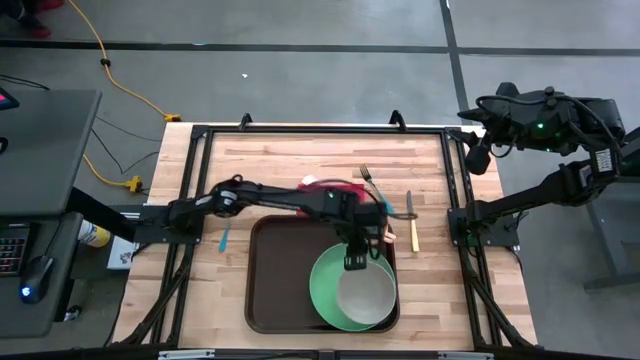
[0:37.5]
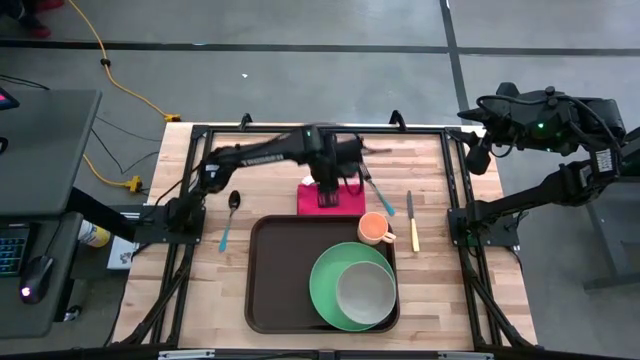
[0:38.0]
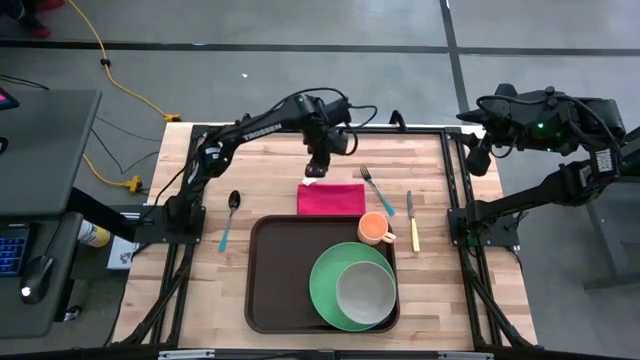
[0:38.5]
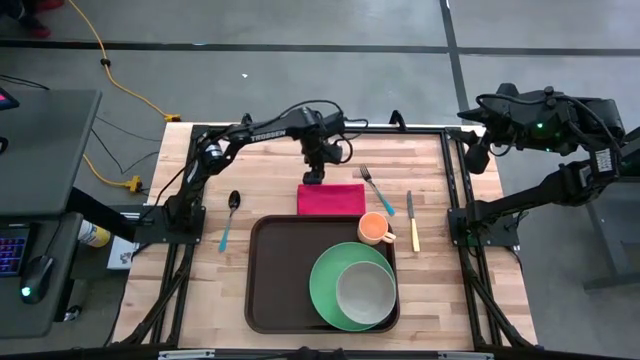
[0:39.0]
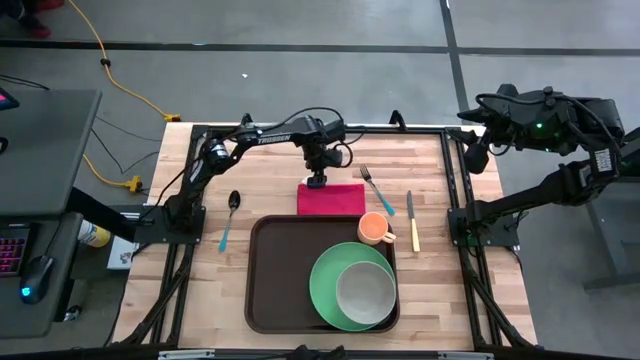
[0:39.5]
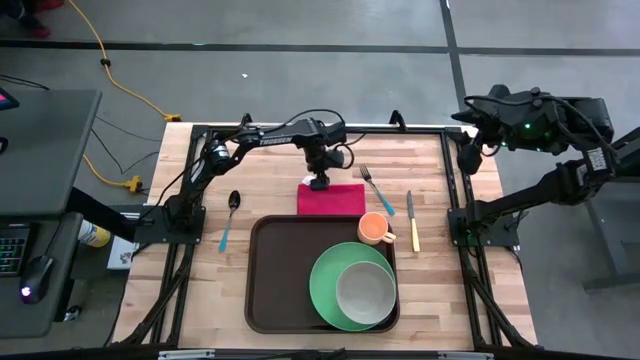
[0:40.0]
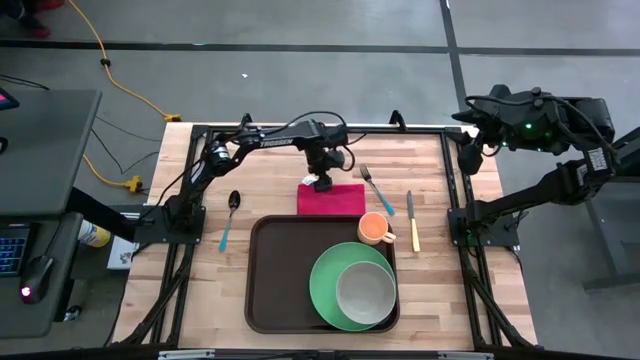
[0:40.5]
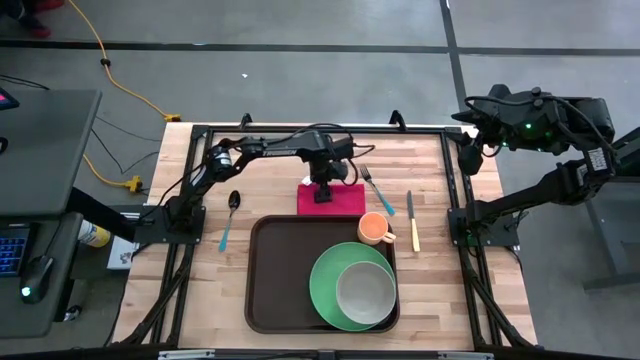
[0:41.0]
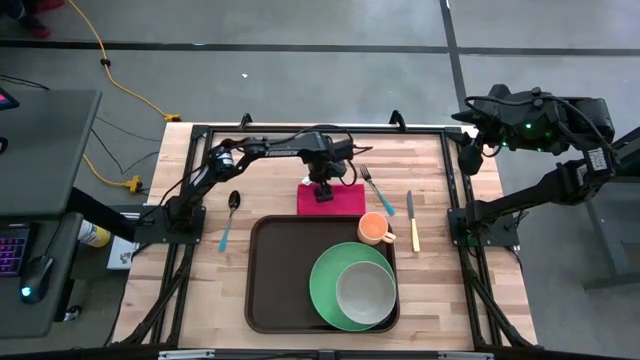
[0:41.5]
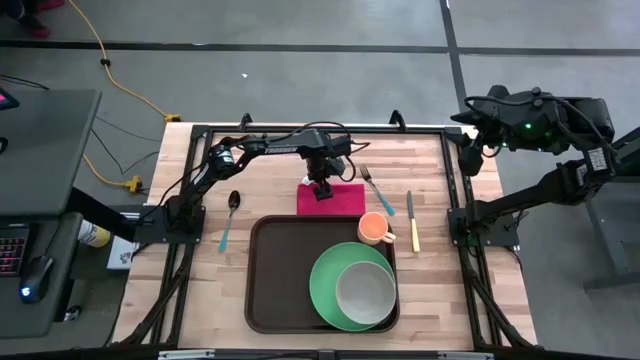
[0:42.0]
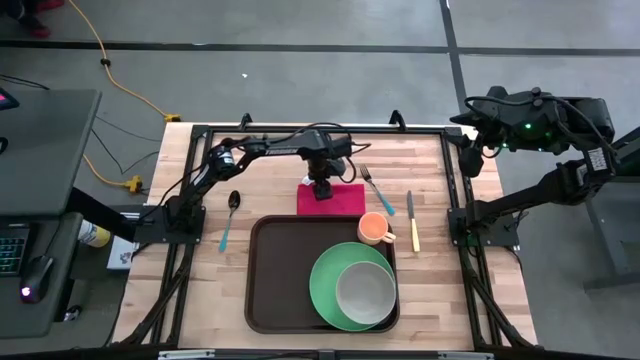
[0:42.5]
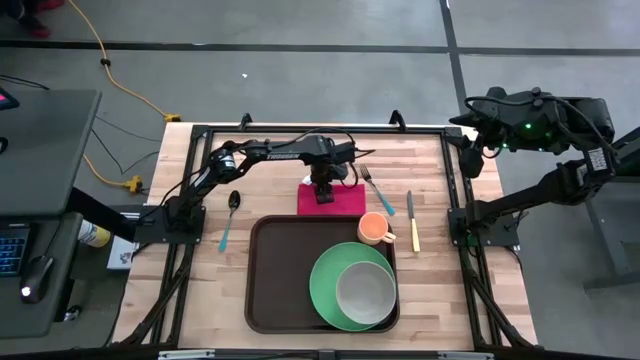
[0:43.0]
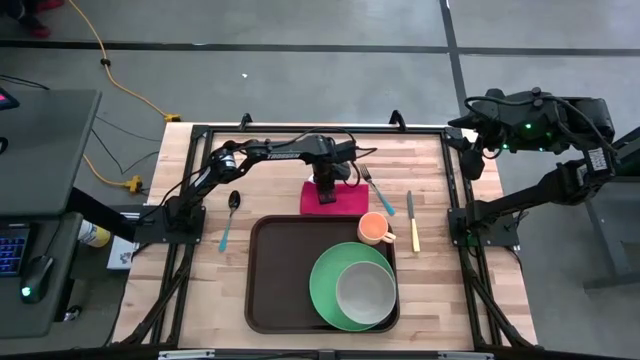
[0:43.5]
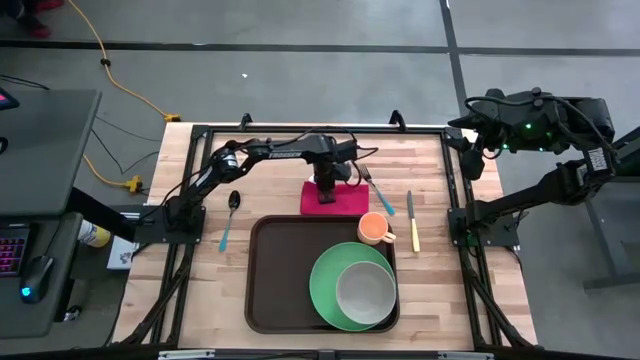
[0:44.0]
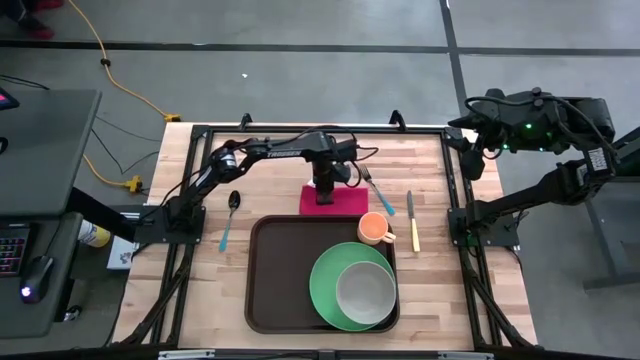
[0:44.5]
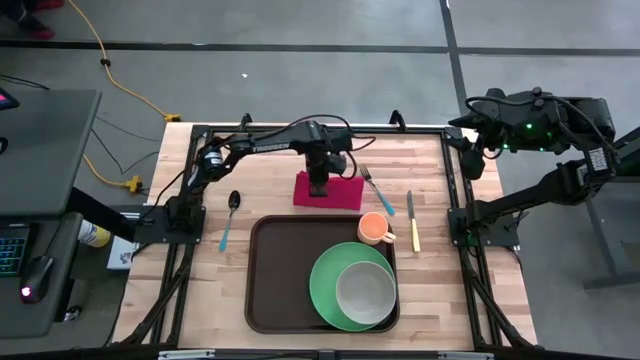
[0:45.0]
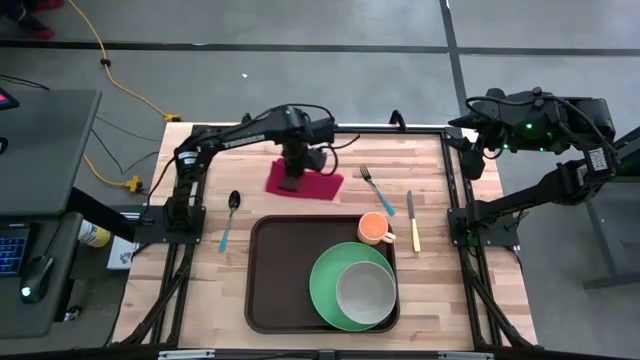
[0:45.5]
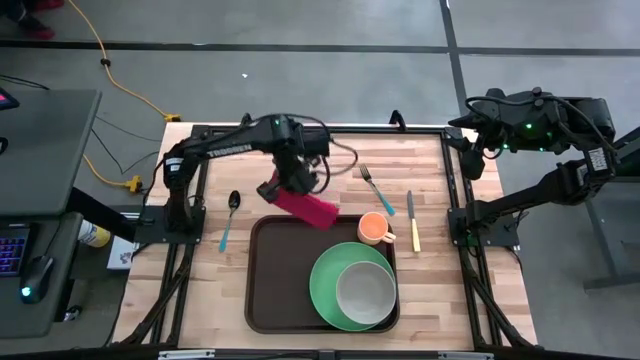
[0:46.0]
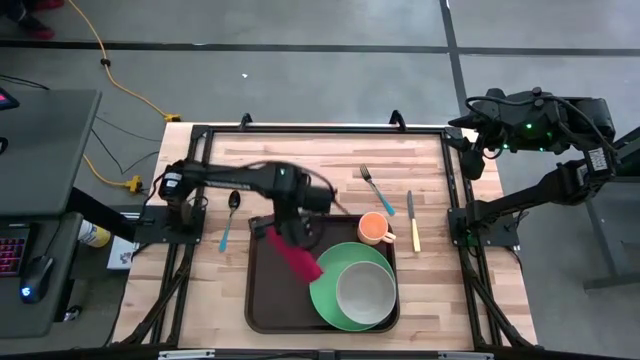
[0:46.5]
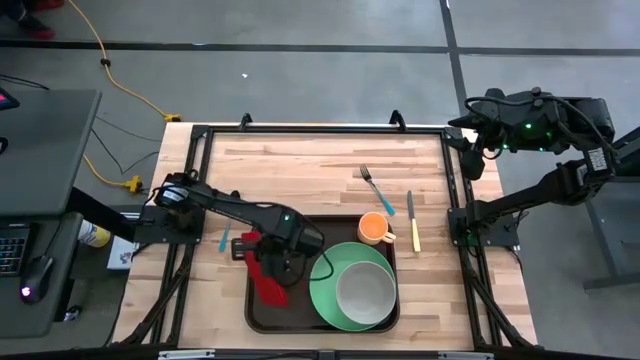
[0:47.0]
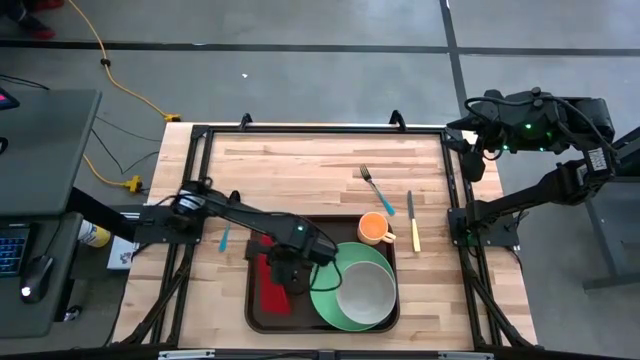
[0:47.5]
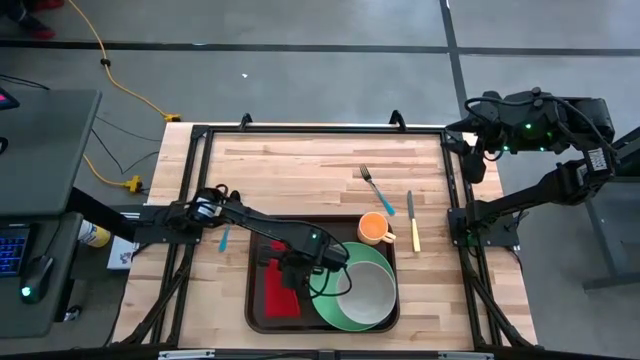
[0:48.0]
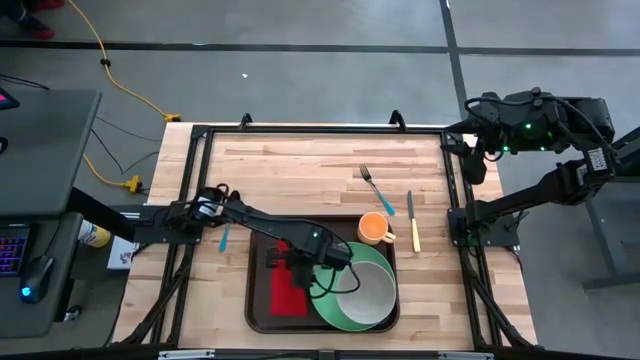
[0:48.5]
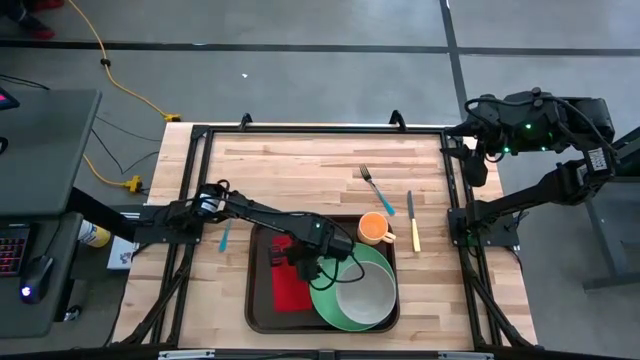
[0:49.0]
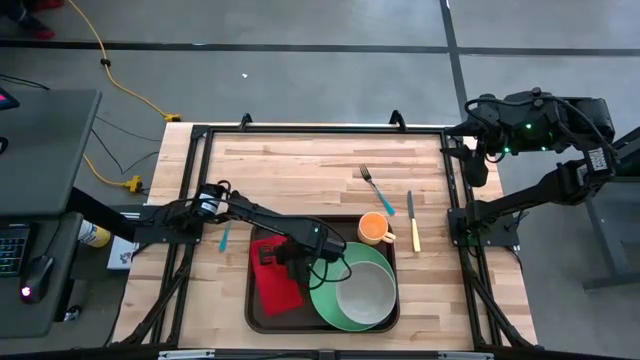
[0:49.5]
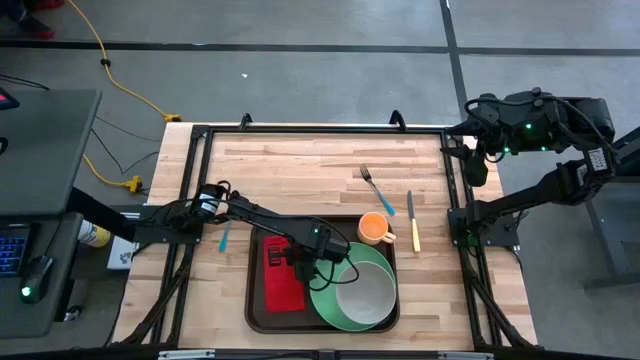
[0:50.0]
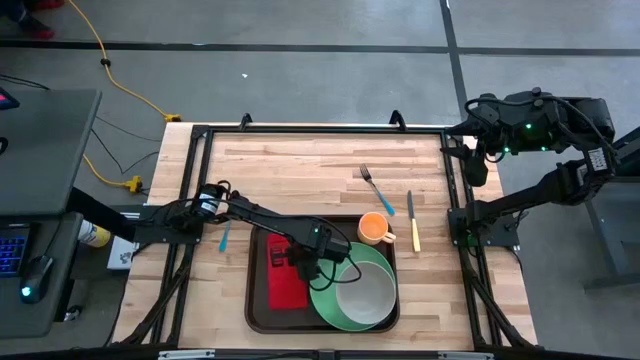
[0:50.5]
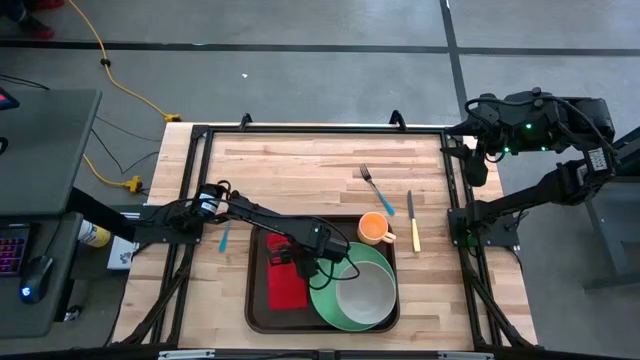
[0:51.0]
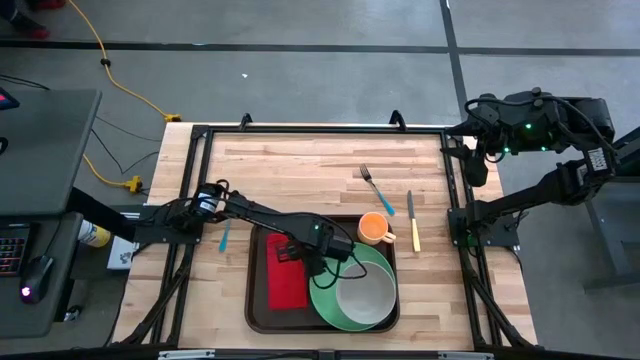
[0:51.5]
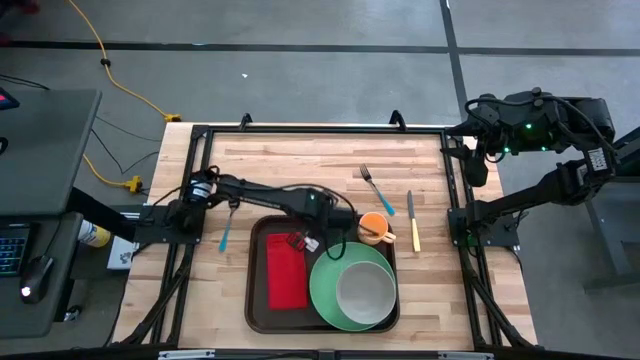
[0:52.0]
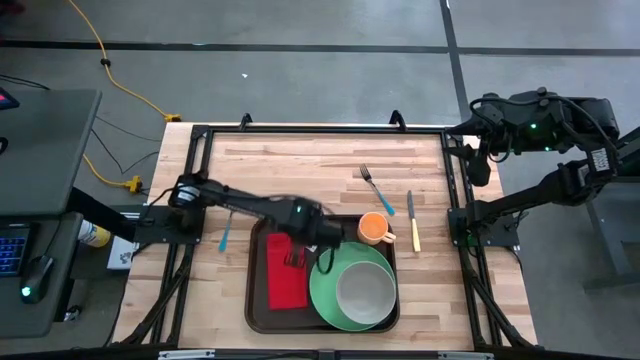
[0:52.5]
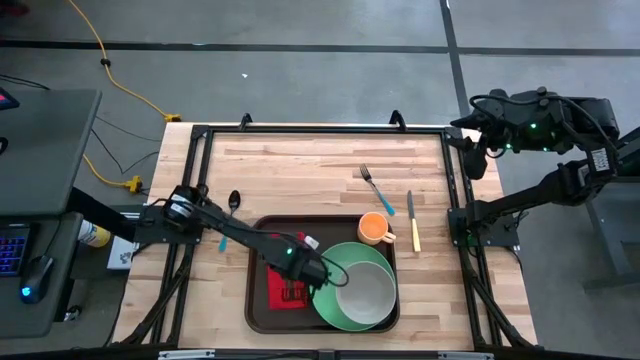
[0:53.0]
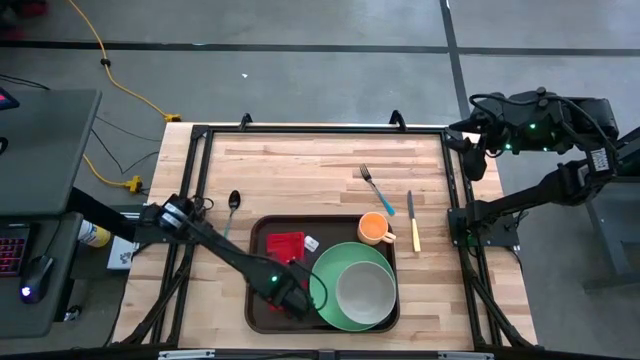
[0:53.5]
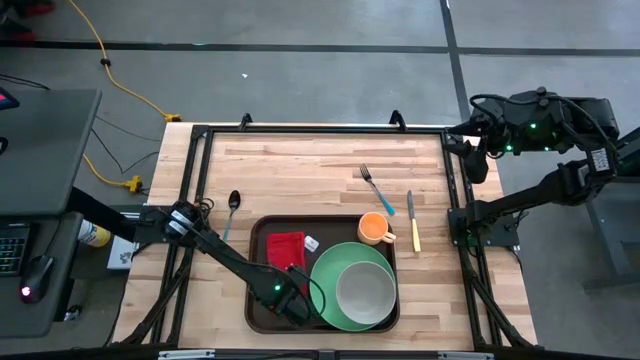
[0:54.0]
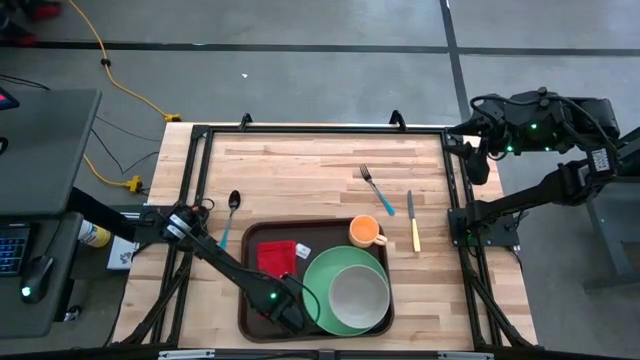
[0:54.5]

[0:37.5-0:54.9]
Task: Set up tray
Put the red table napkin on the brown serving tray to the left of the green plate

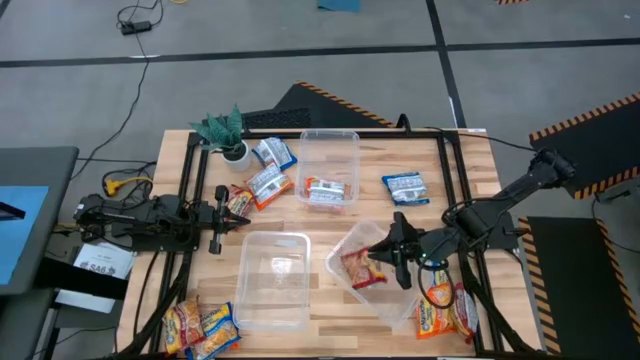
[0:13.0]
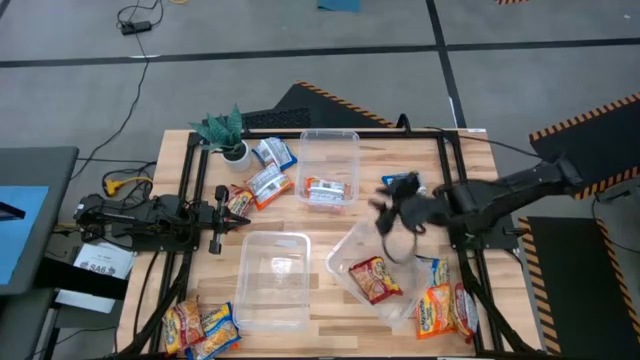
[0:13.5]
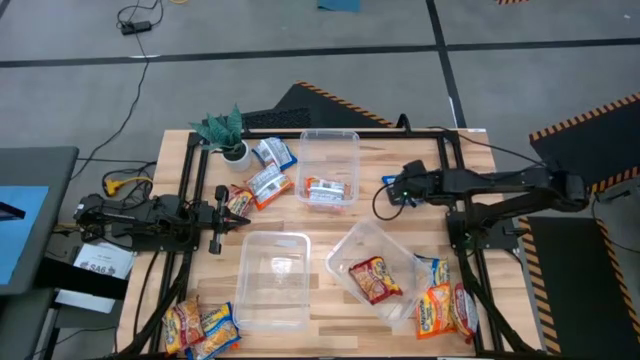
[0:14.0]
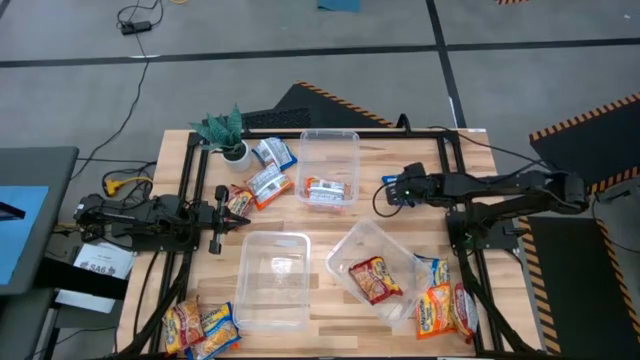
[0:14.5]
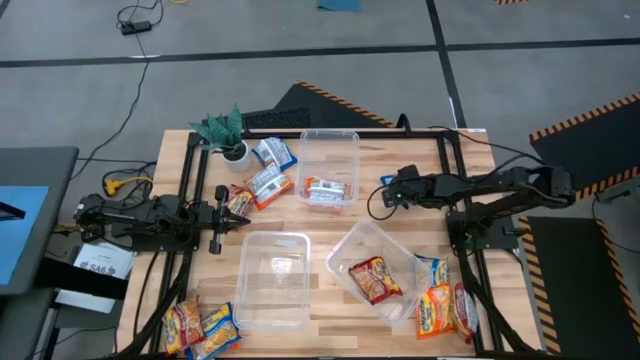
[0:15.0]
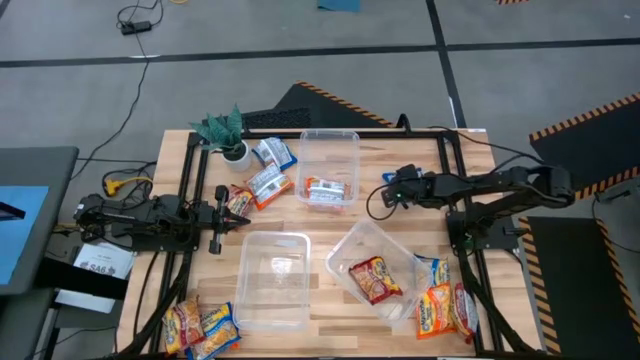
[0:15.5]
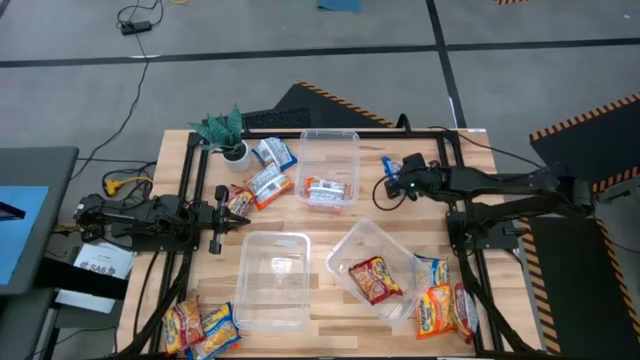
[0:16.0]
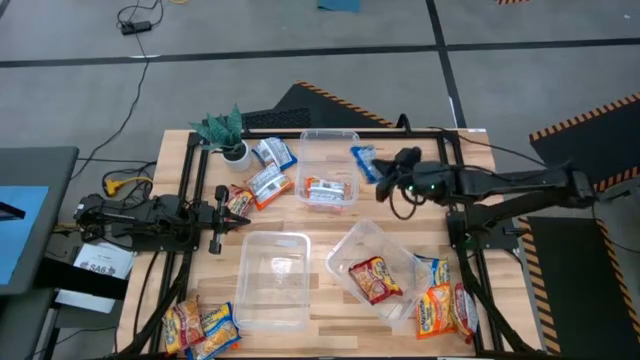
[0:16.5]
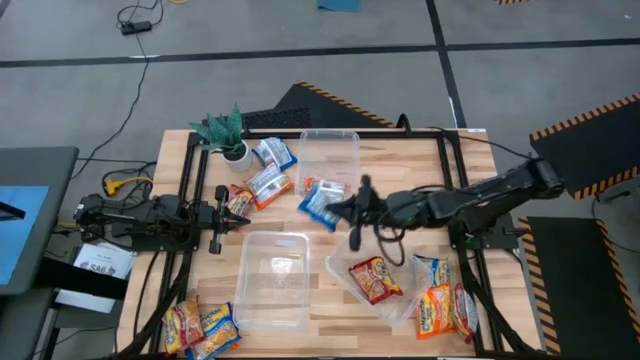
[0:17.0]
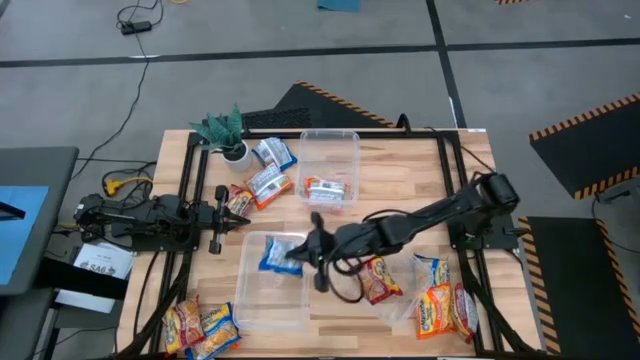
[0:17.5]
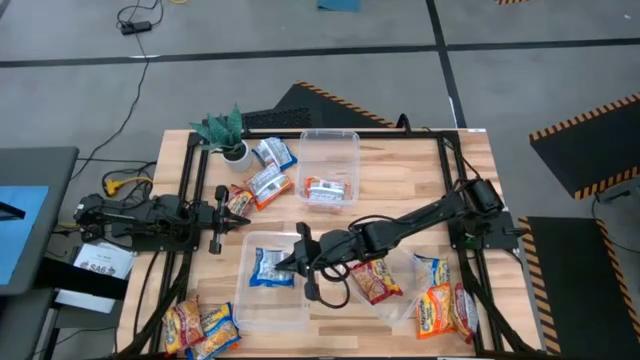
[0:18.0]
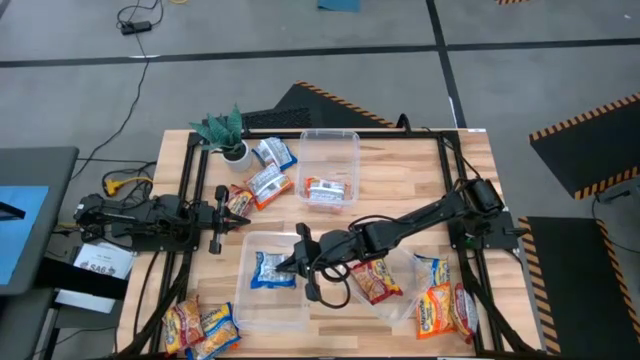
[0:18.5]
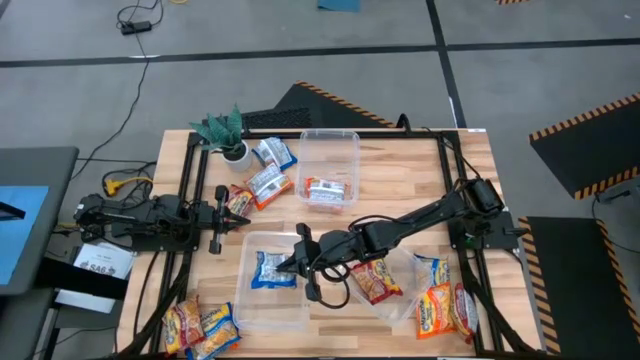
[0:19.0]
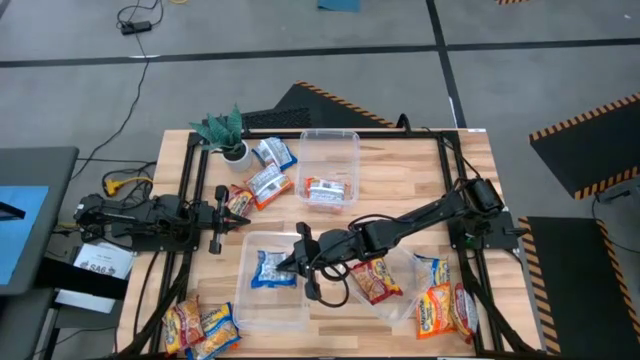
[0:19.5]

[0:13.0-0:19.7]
Task: Sort Maruchan noodles
Put the blue noodle pack into the bottom left transparent bin
